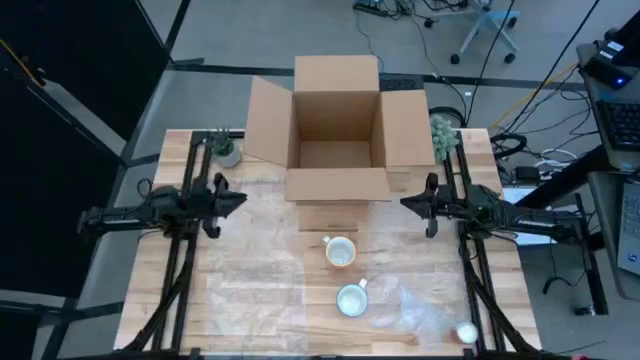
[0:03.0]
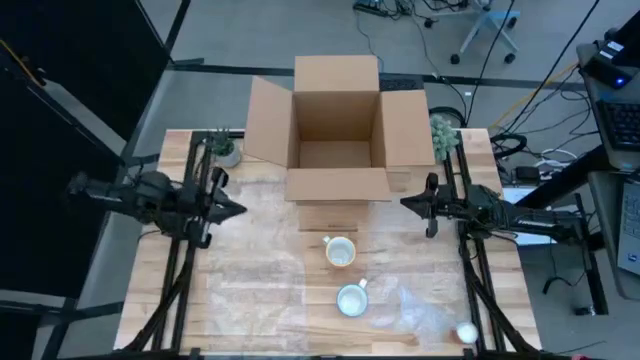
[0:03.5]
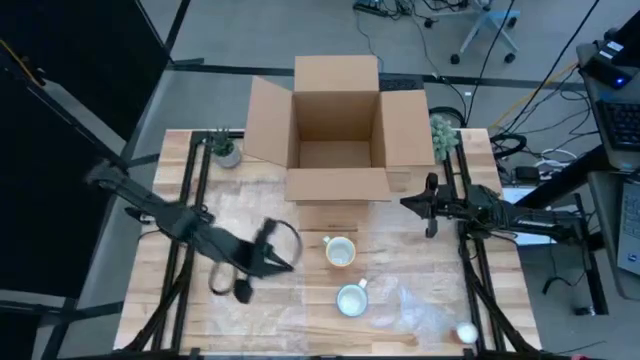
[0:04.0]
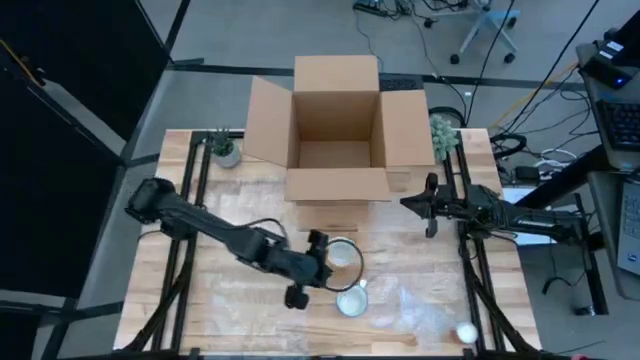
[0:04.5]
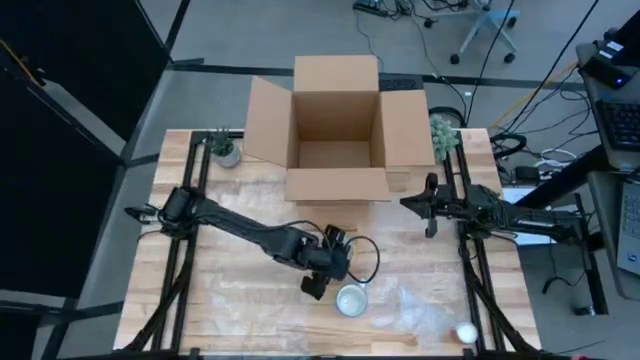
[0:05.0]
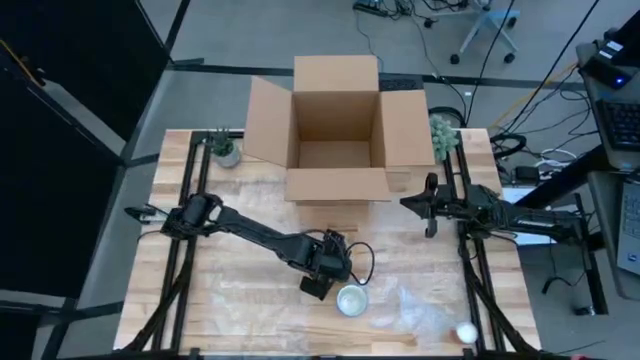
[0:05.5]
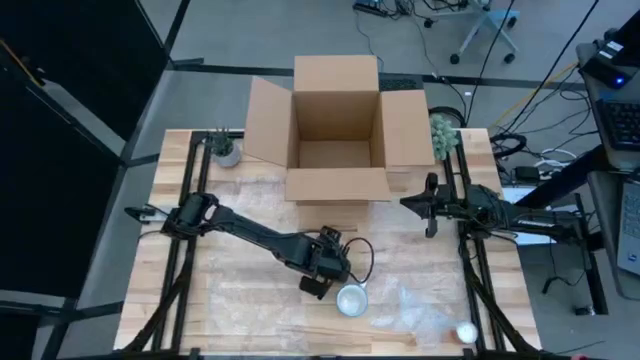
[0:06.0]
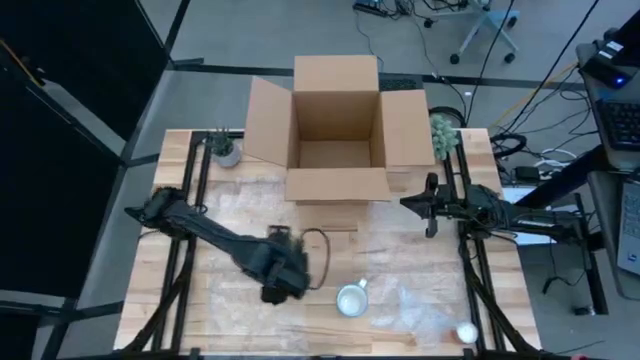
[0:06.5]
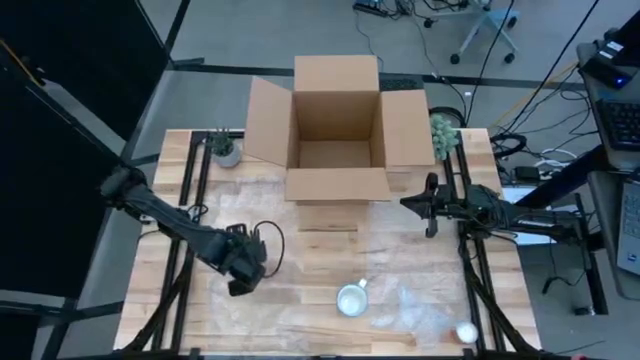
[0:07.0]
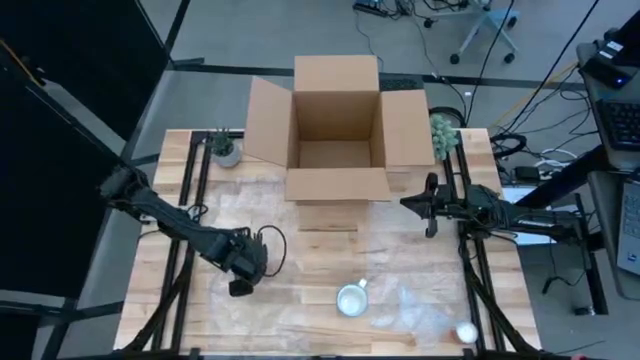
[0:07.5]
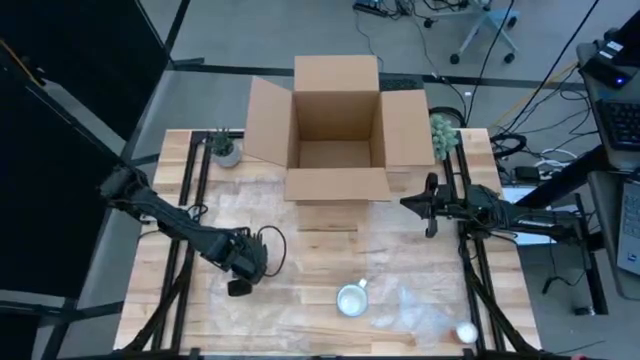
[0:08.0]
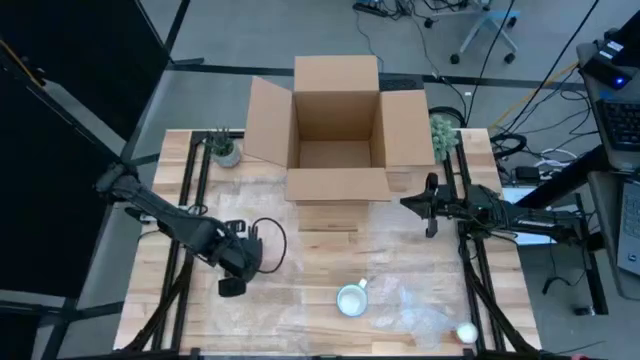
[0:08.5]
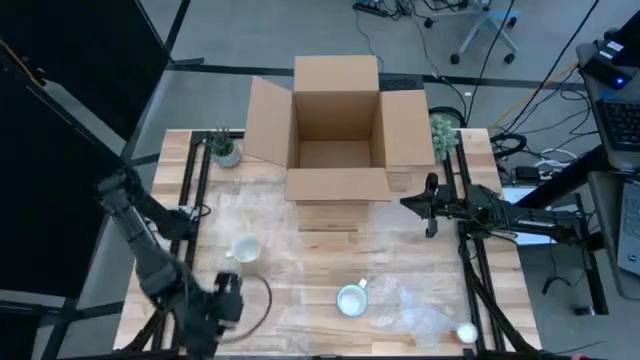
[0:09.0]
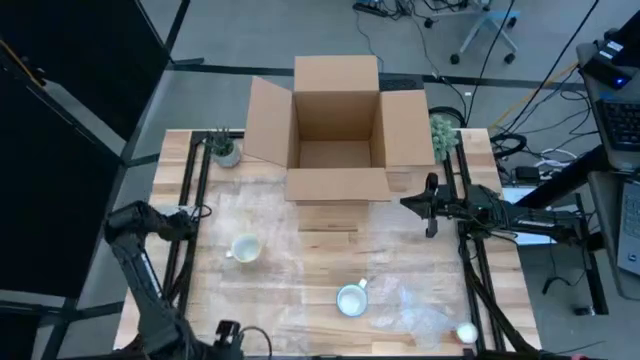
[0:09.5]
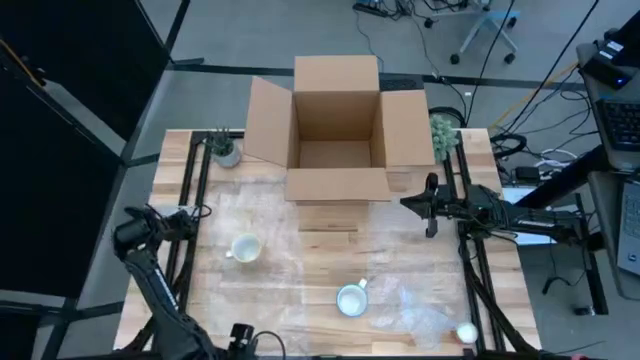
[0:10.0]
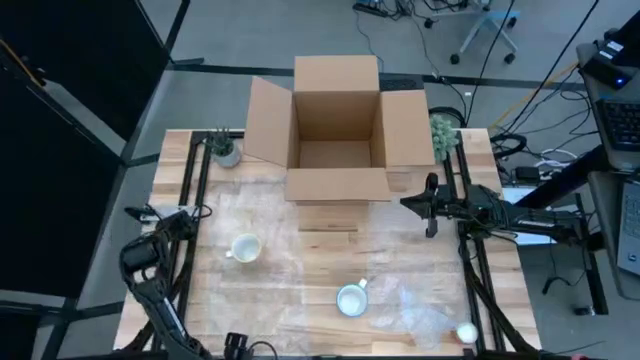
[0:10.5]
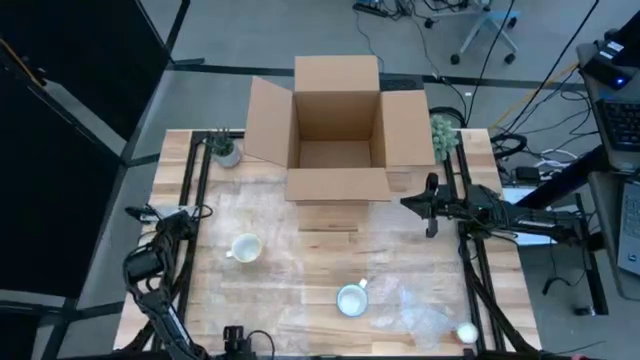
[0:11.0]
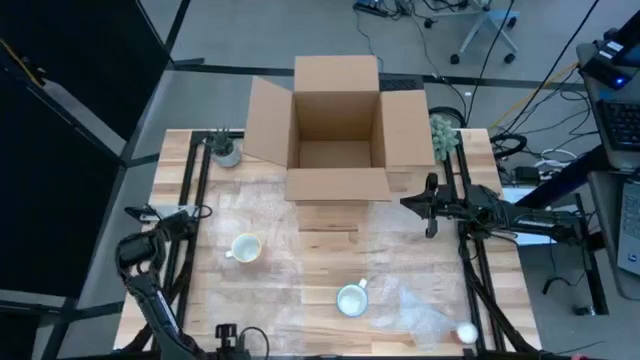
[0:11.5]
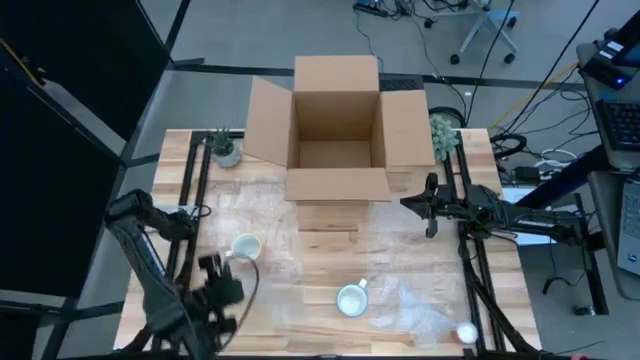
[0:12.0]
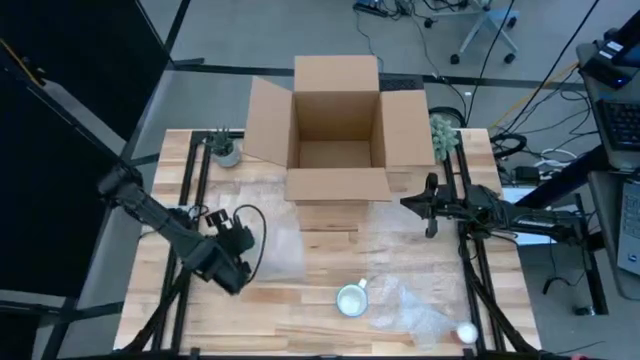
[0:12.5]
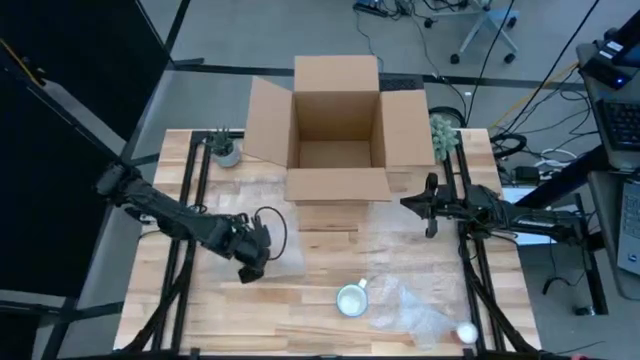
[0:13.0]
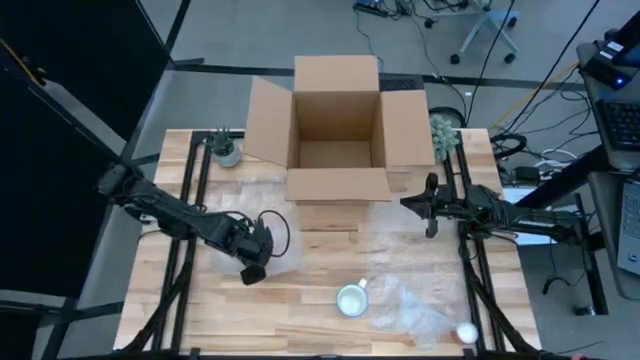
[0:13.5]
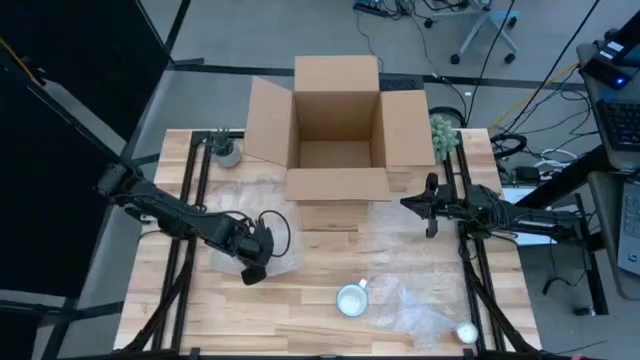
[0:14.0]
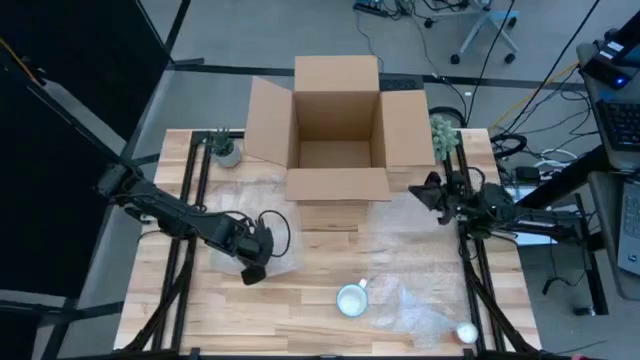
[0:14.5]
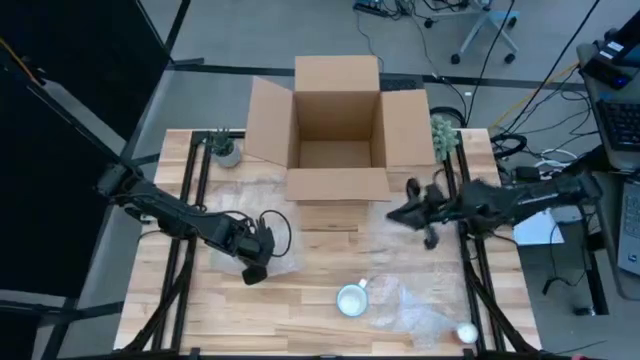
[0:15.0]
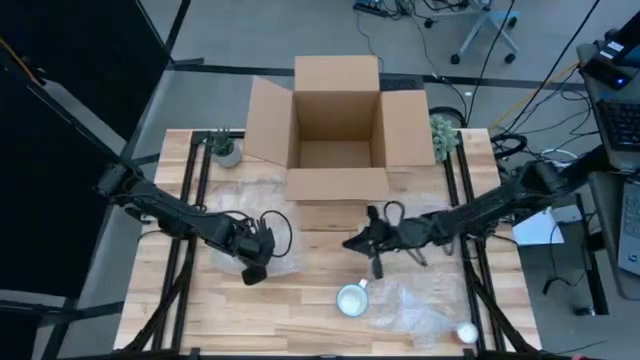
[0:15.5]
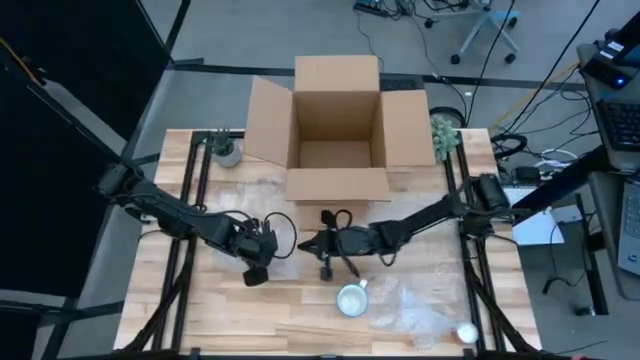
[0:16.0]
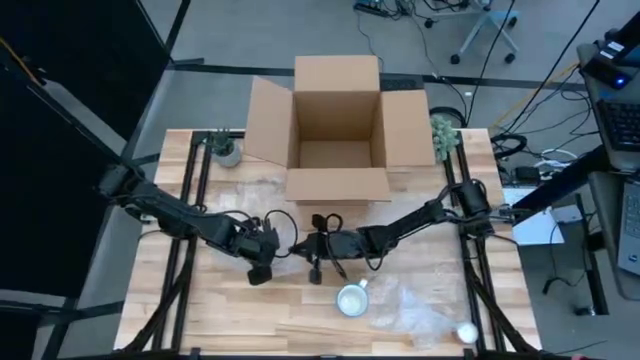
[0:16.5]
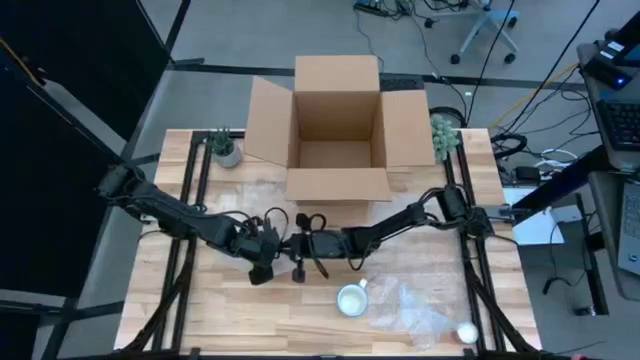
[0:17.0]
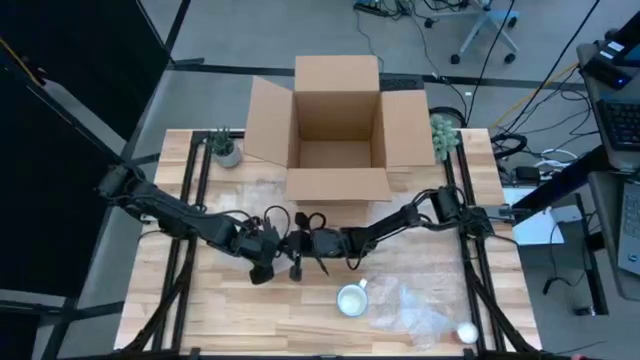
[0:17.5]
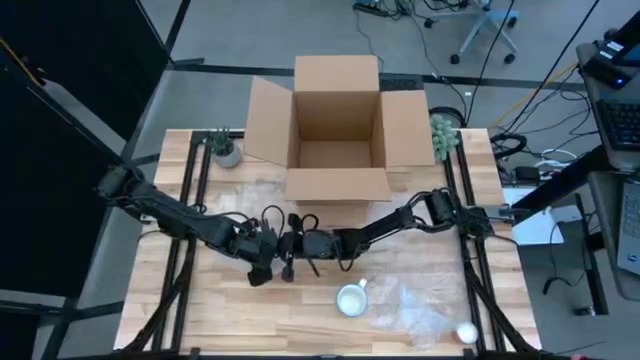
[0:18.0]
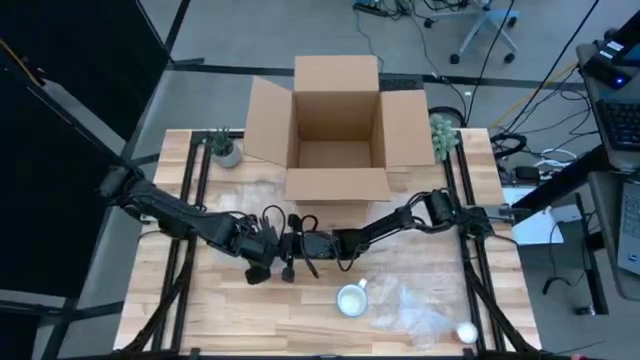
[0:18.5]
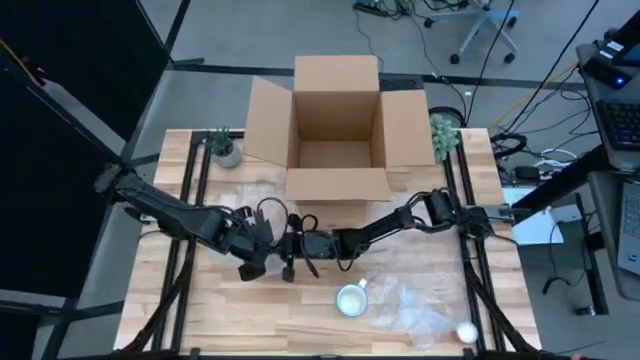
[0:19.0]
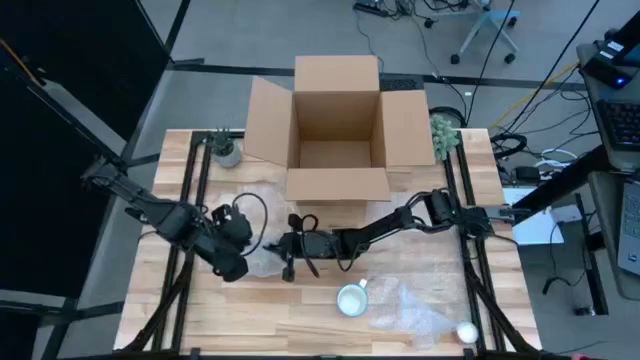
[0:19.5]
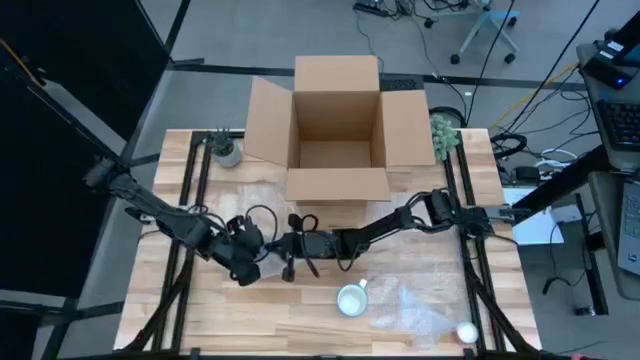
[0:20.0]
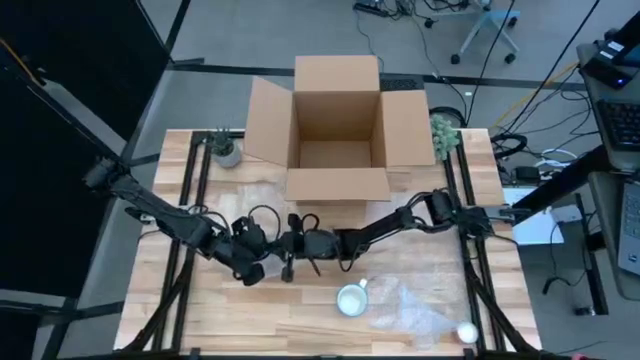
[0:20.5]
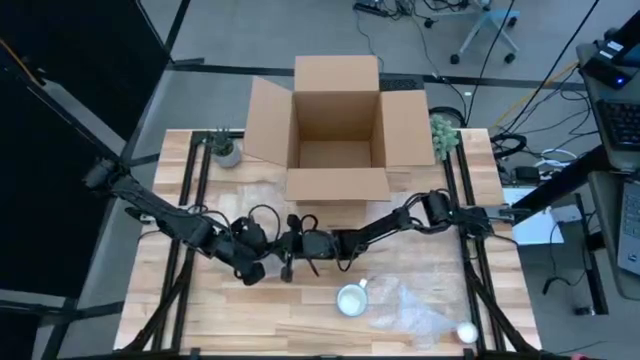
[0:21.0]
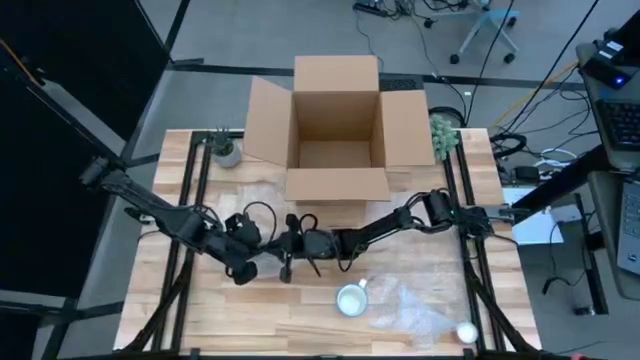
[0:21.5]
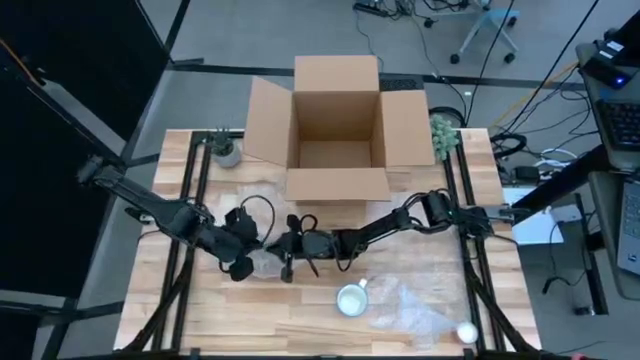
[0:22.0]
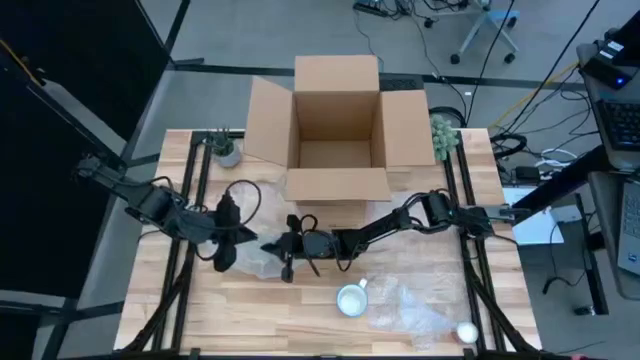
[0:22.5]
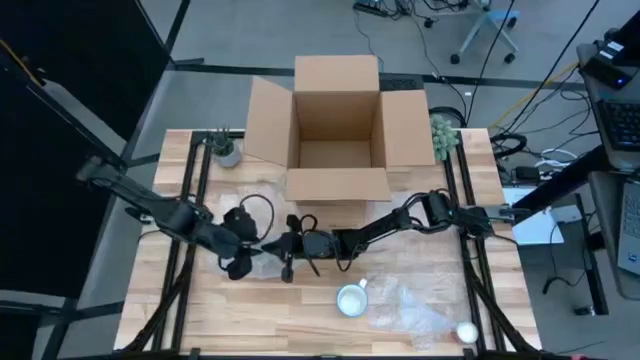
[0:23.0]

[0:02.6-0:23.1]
Task: wrap mug
Wrap the yellow mug with the left bubble wrap
